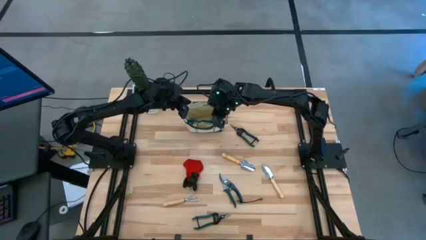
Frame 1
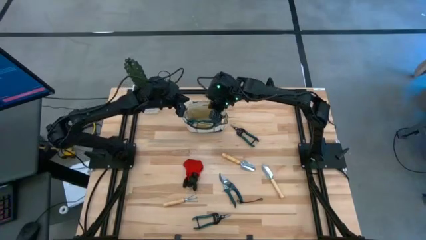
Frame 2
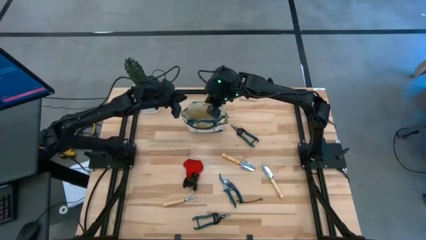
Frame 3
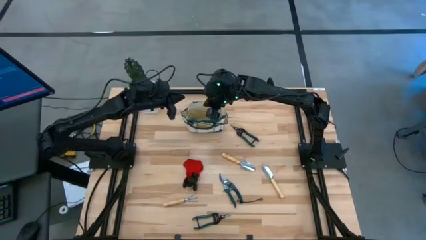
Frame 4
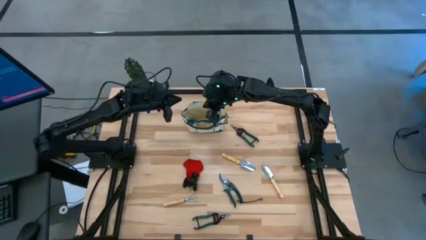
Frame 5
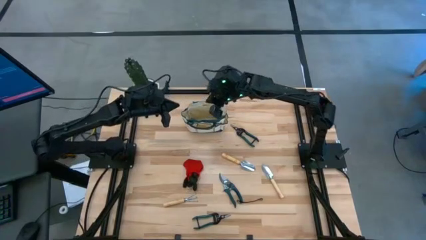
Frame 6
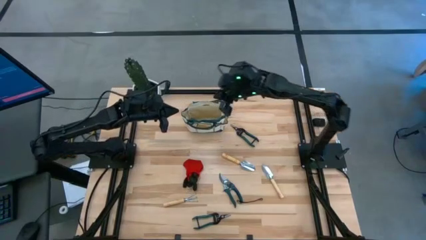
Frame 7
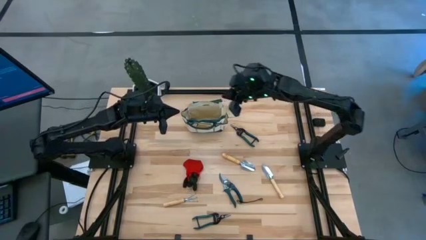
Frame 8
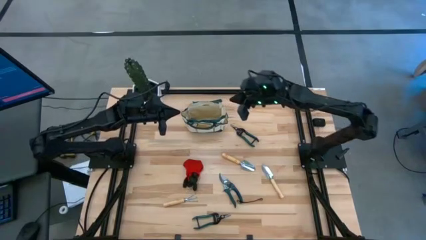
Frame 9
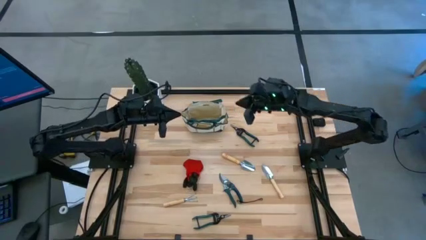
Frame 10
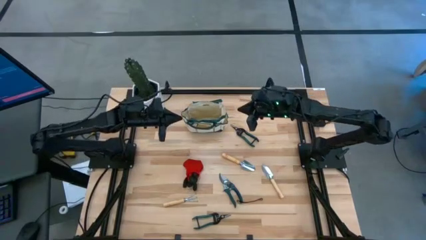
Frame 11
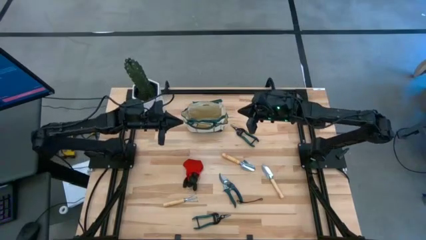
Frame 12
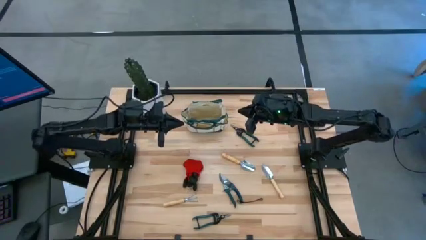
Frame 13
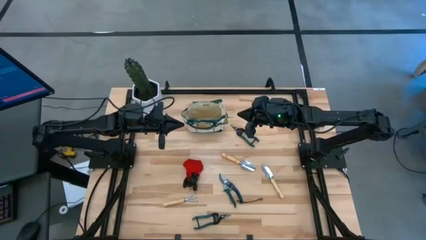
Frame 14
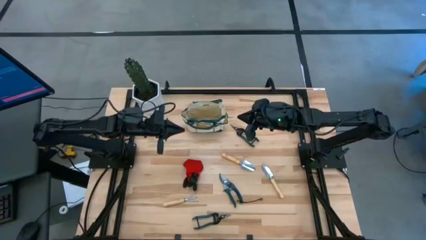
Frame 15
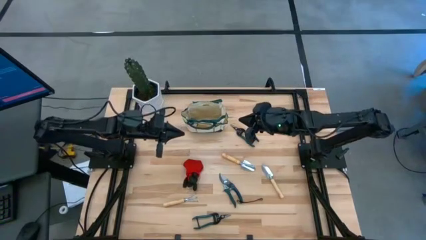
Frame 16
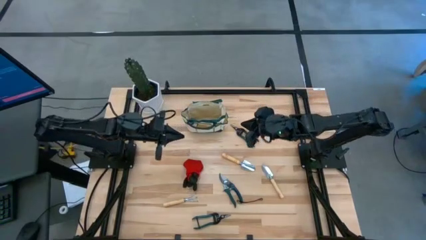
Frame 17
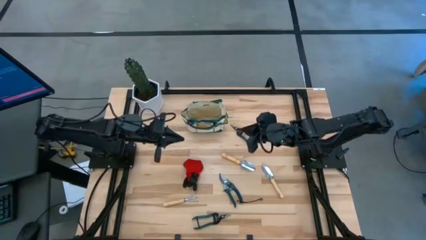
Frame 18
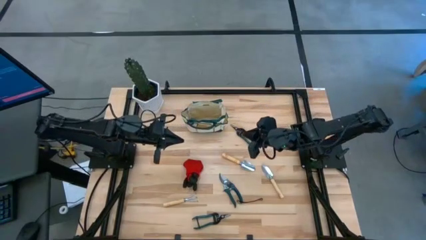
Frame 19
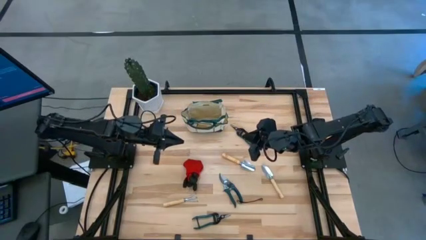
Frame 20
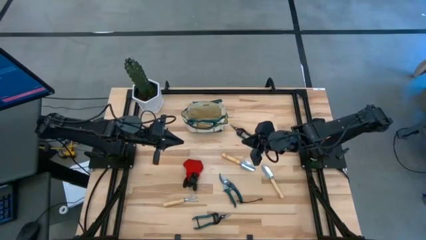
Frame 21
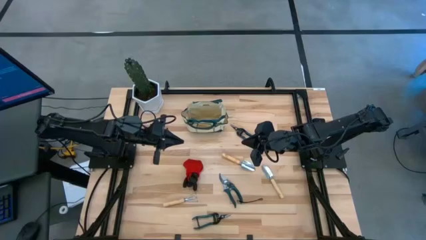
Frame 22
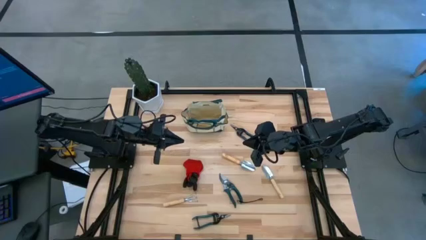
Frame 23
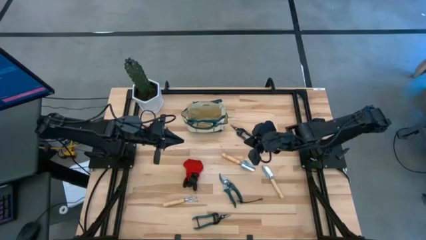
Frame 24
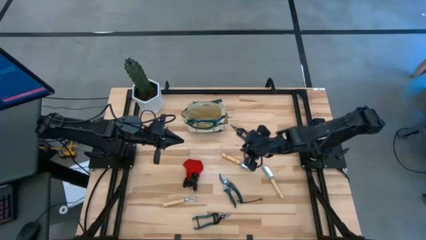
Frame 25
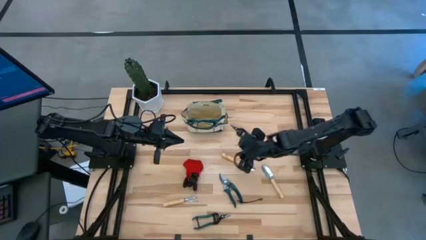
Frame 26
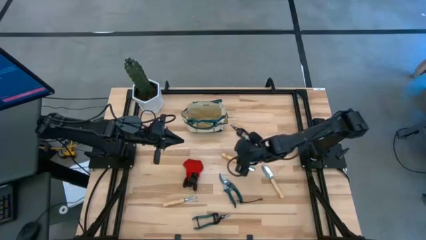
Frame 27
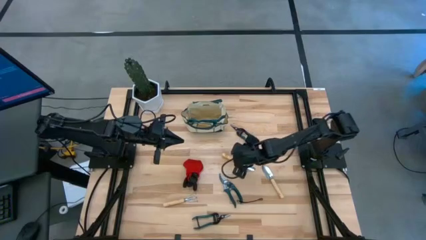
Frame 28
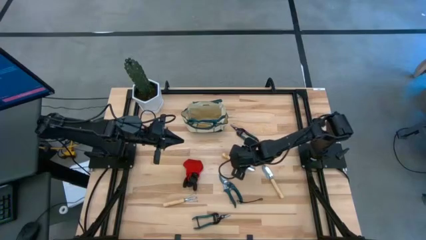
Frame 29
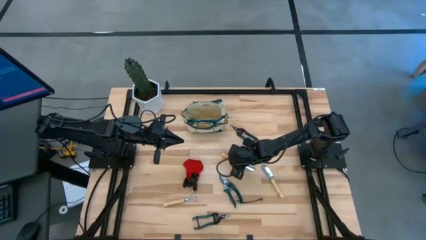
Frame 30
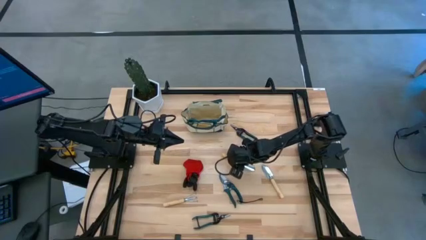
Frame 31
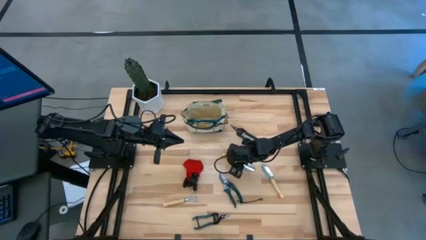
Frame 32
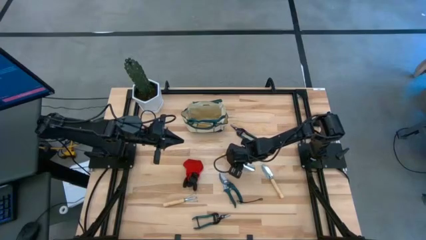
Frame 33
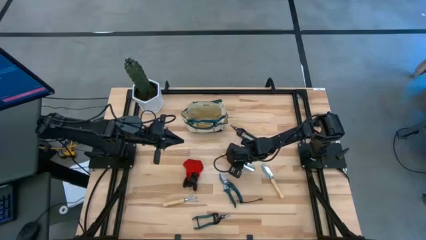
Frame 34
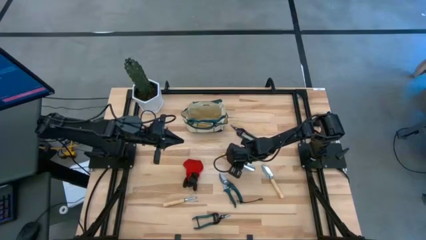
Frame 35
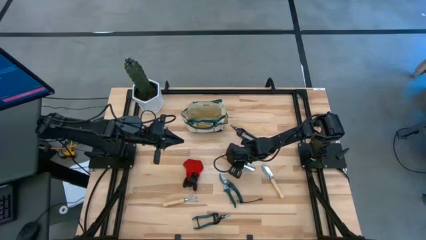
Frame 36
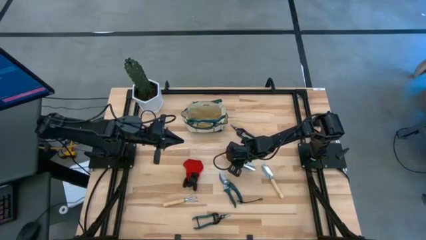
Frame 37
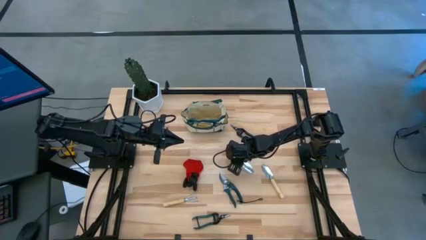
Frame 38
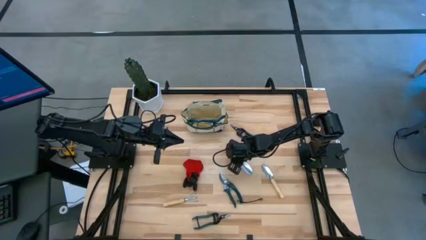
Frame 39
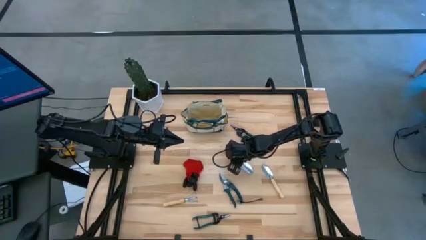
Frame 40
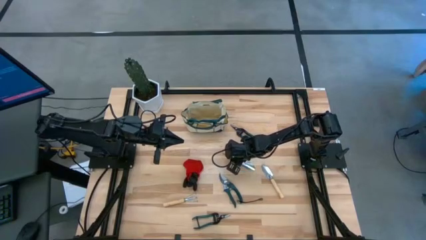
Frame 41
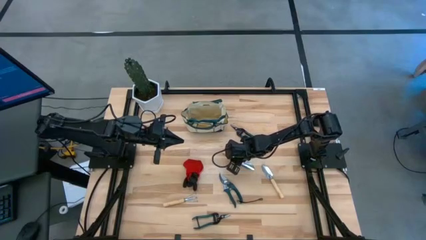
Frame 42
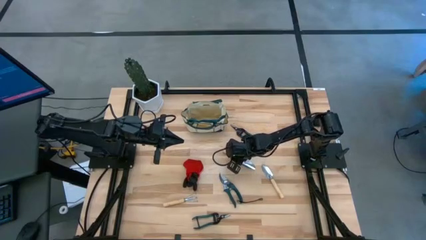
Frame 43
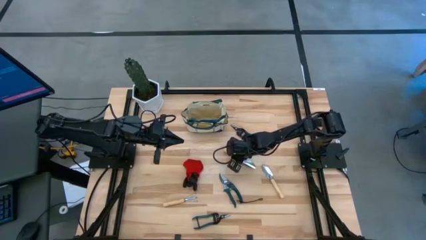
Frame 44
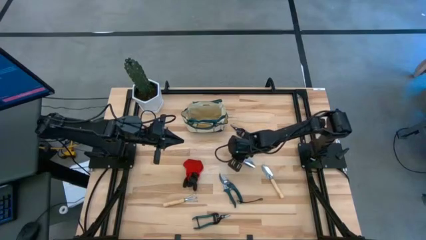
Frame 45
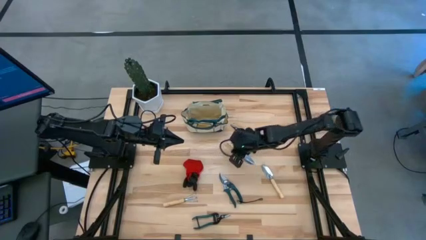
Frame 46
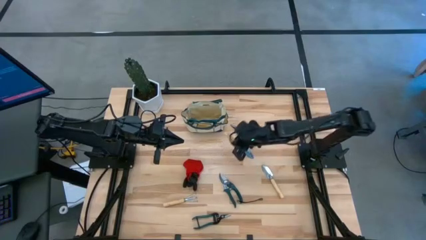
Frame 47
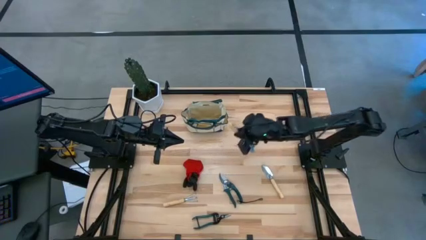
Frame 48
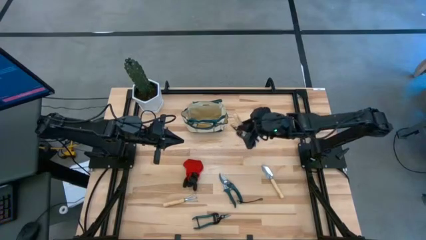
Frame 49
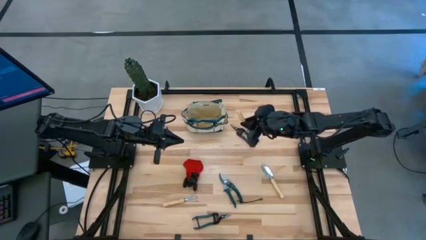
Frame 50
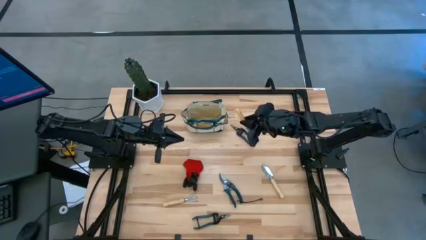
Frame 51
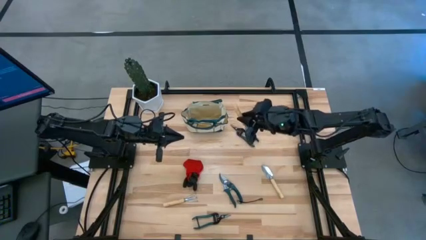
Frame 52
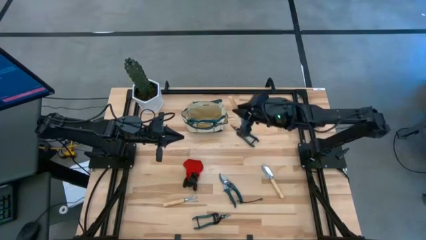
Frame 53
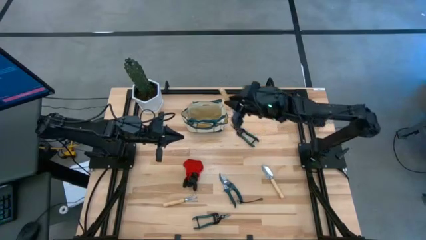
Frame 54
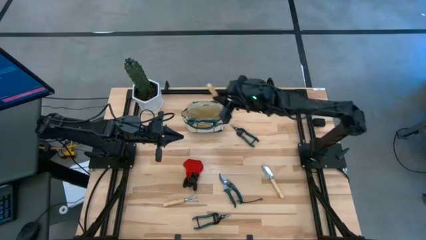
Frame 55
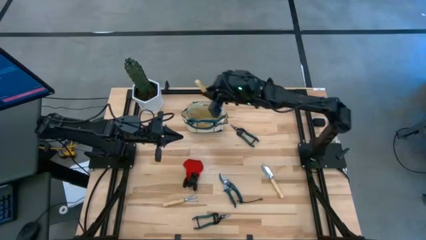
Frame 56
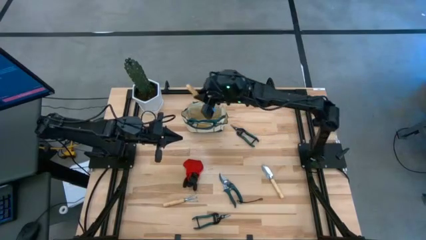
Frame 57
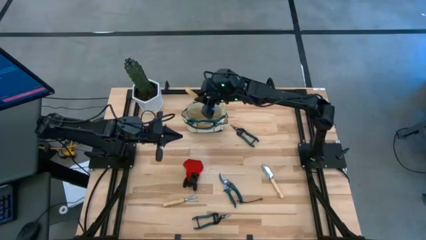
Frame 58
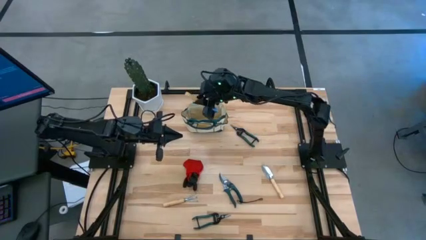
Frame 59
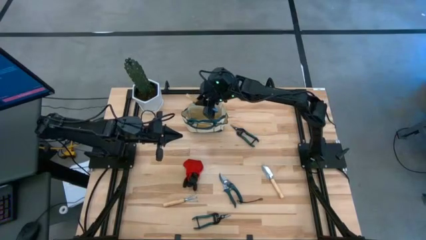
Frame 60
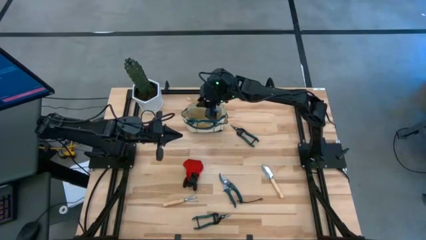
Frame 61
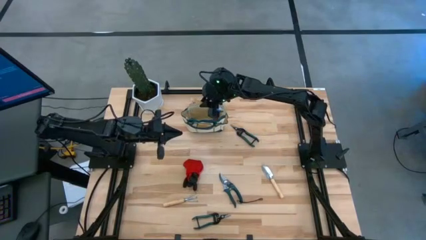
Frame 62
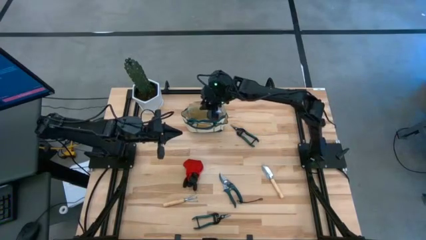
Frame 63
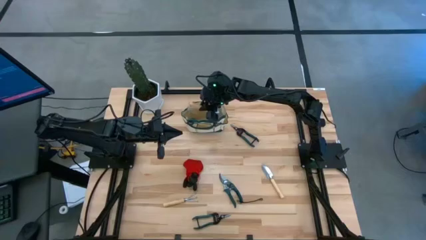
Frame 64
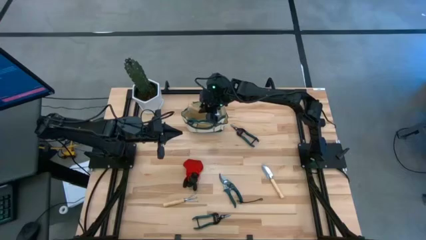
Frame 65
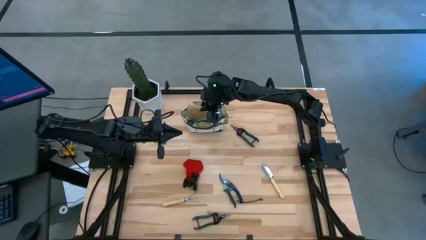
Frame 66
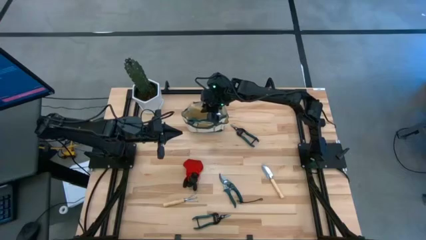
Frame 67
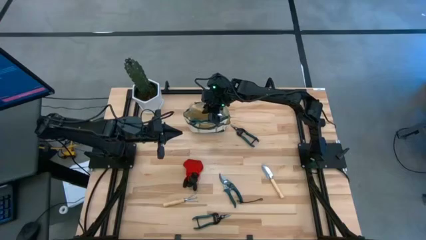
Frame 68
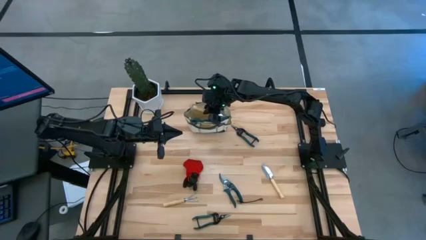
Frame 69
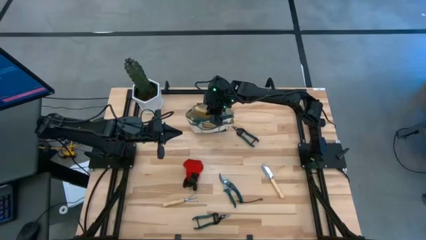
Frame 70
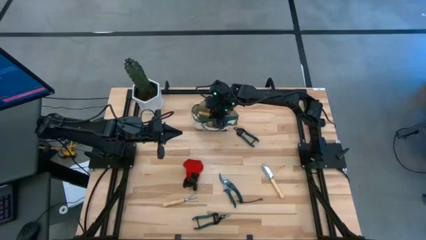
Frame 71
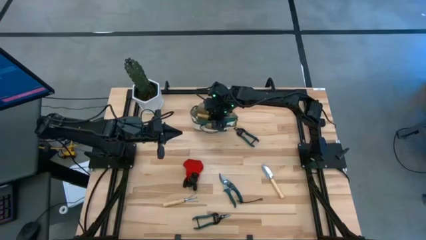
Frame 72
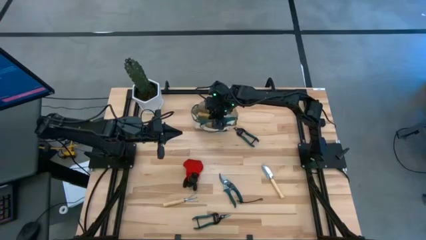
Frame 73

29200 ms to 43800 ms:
Task: Pick & Place Garden tools in Gardening bag
Put the left trowel into the gardening bag
